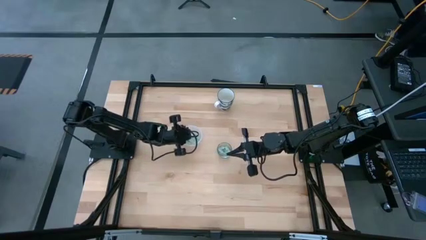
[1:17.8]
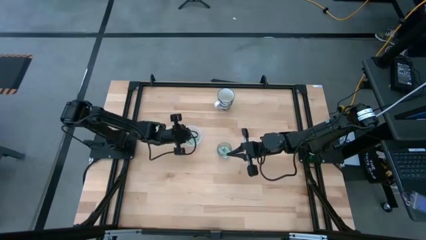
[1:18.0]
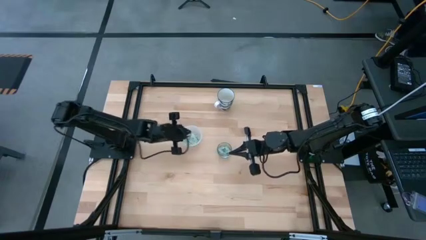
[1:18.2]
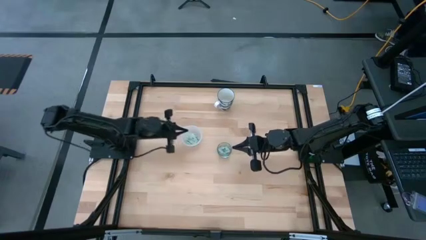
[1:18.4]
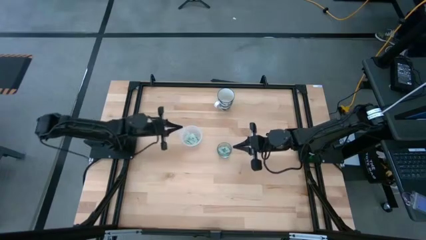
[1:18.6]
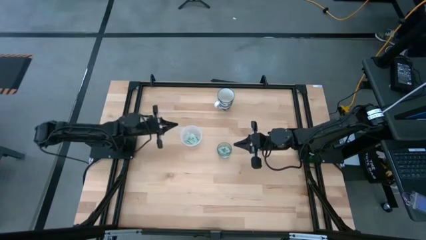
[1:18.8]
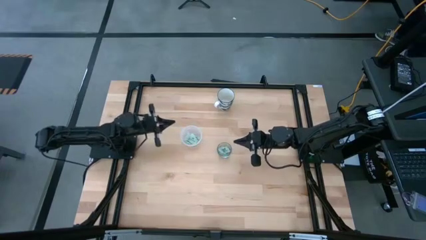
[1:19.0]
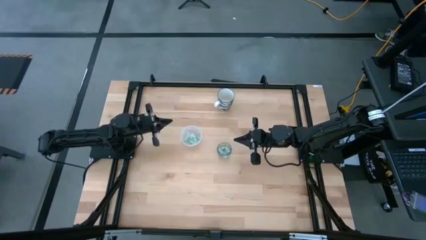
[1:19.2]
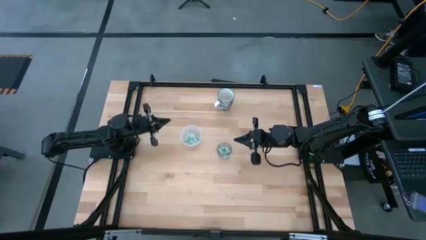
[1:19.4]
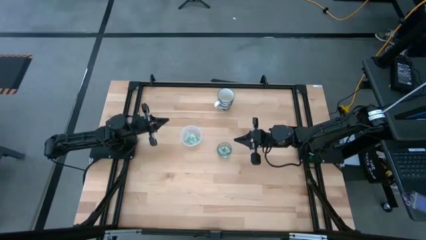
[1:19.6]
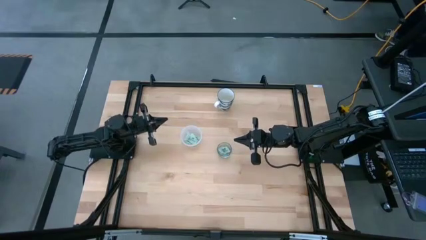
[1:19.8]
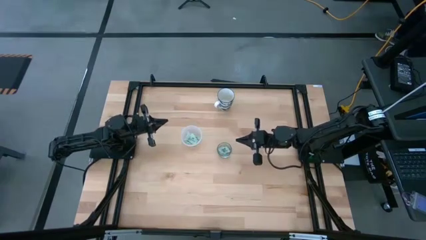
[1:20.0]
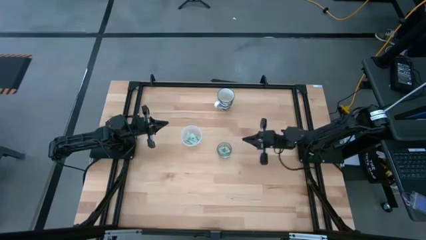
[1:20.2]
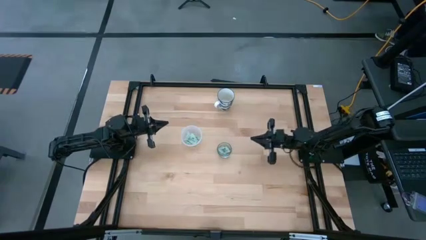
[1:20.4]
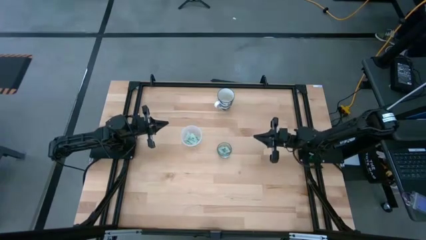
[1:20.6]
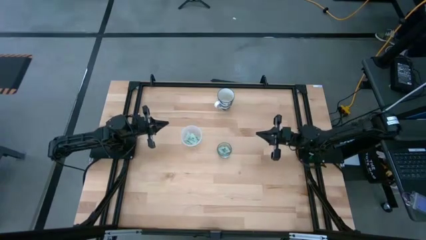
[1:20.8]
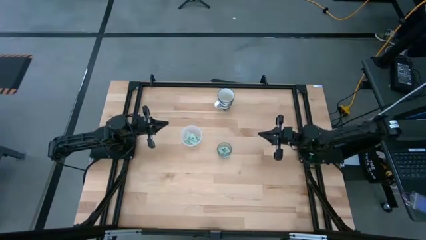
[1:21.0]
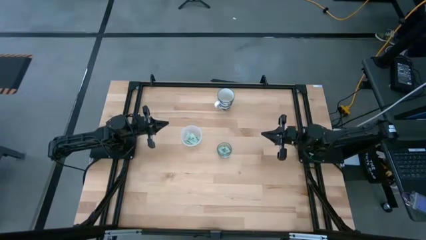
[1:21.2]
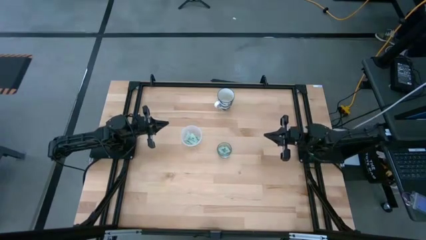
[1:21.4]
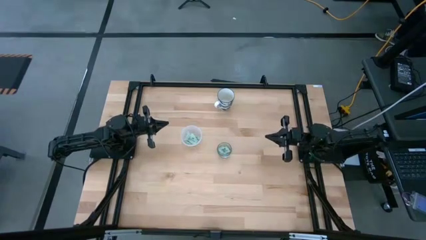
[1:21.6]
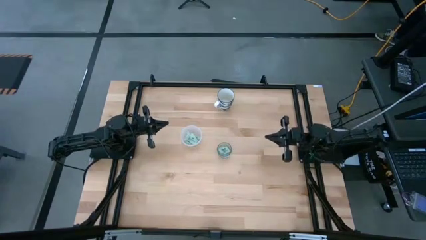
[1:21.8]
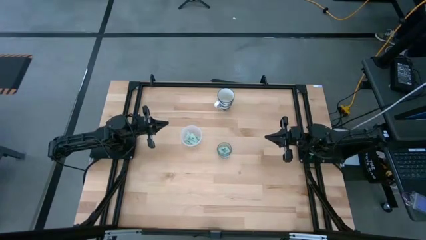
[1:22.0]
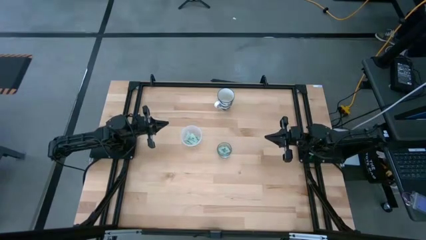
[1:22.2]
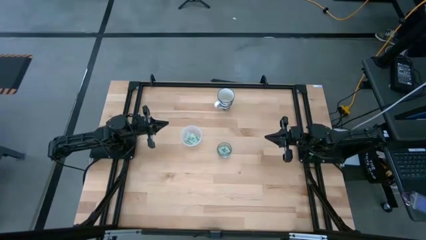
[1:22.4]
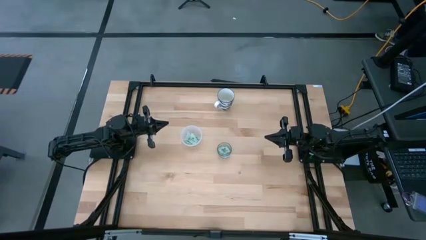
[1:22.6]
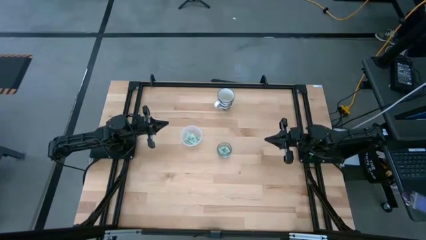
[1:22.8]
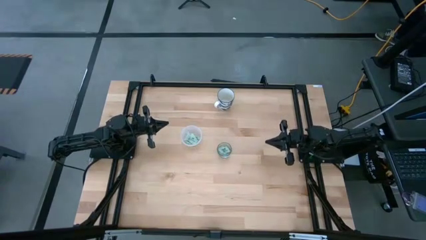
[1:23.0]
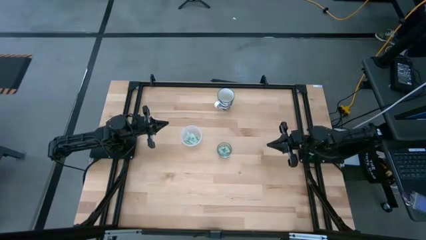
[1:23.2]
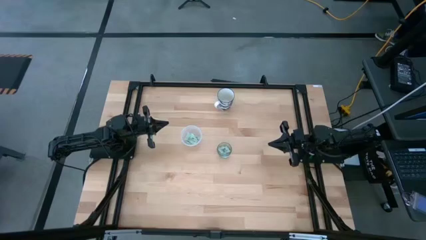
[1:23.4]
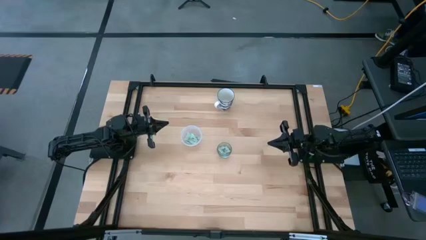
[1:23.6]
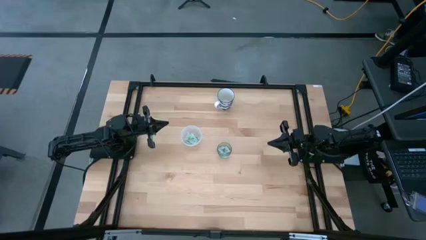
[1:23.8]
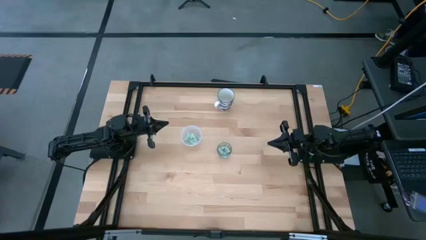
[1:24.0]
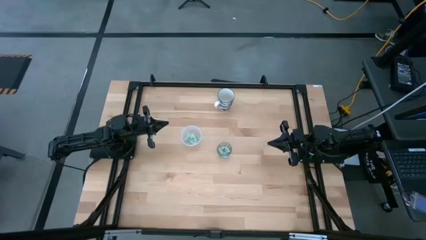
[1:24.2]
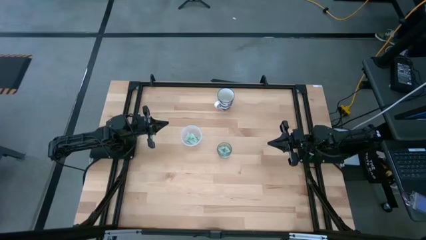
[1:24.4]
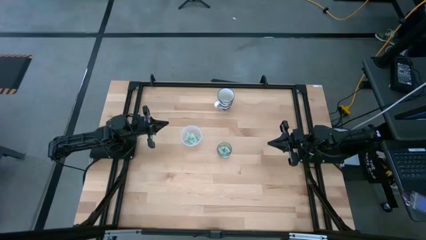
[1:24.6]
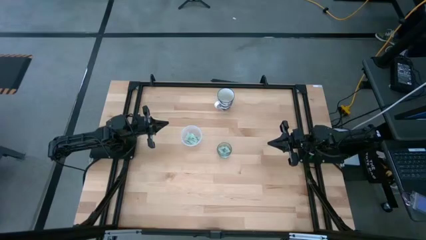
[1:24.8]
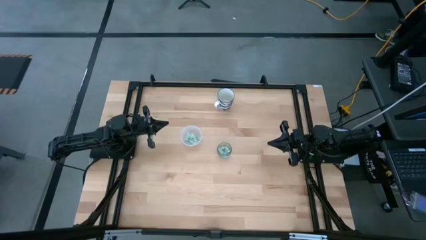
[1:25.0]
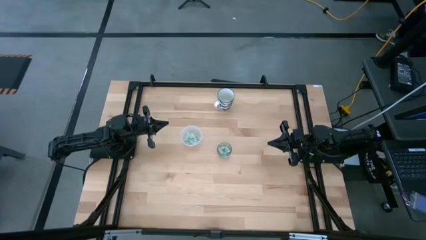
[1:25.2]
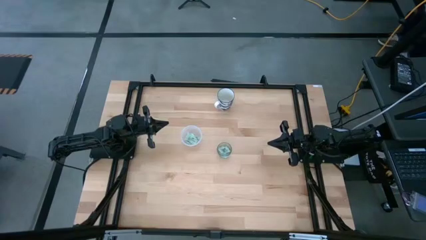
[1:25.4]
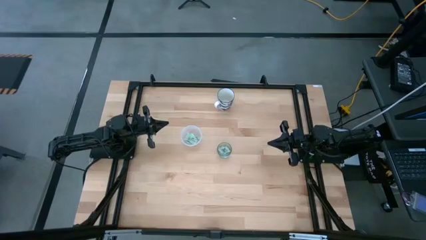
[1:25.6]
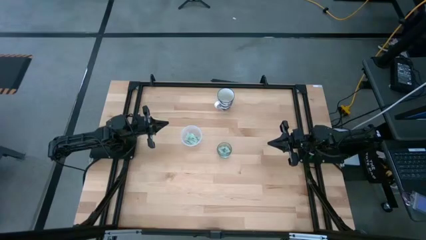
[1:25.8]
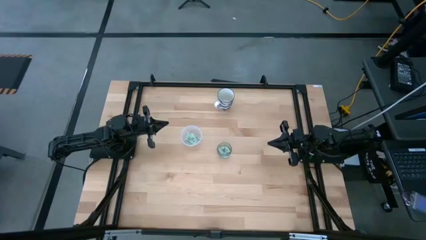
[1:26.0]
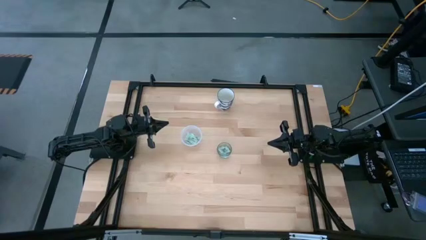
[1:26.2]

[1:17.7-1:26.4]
Task: Pick and place Stevia / Truvia into bins
Return to Home Position

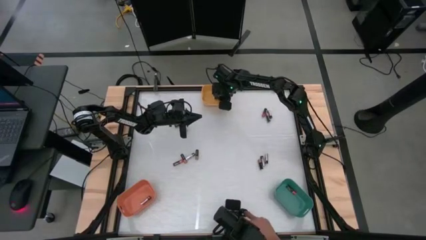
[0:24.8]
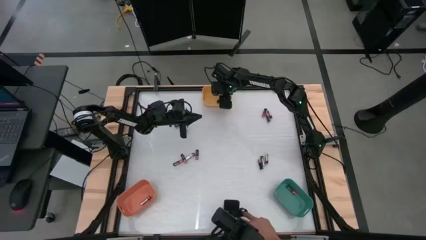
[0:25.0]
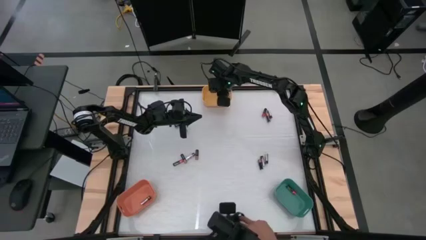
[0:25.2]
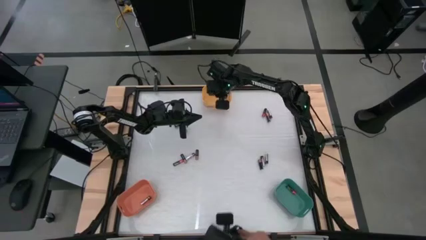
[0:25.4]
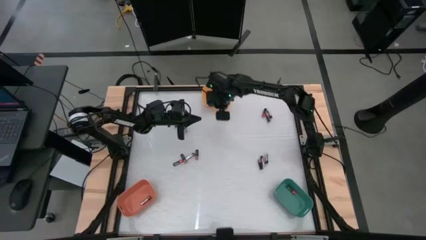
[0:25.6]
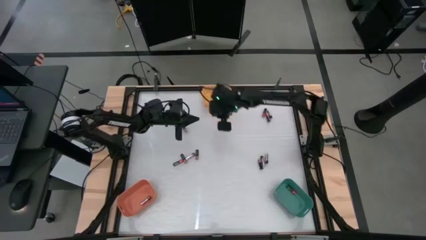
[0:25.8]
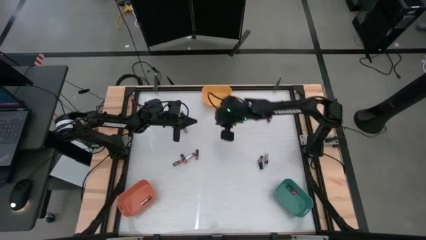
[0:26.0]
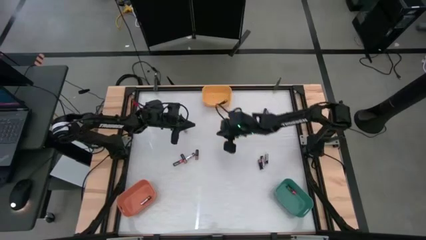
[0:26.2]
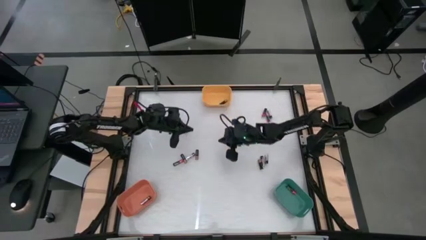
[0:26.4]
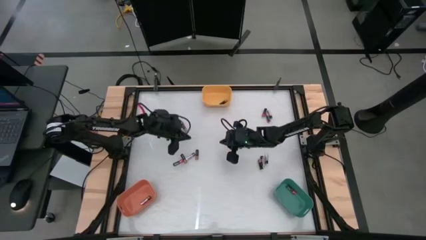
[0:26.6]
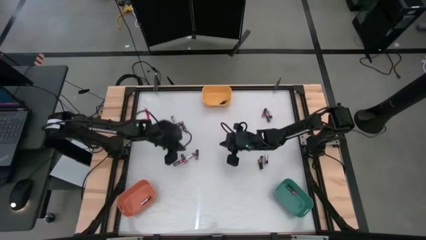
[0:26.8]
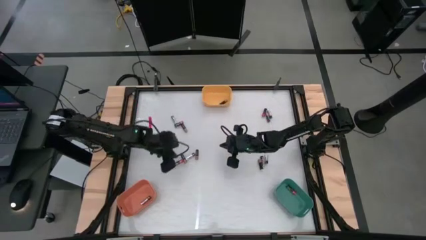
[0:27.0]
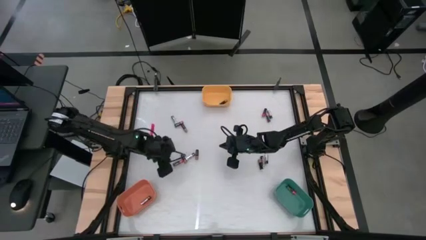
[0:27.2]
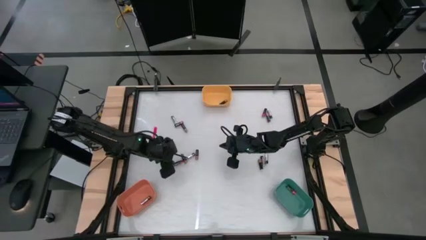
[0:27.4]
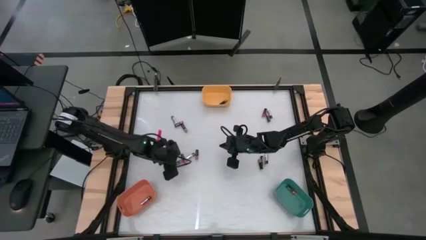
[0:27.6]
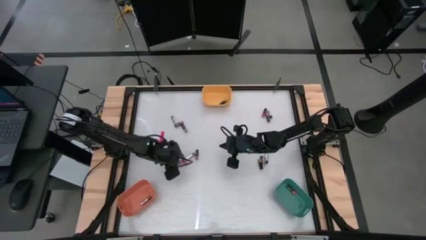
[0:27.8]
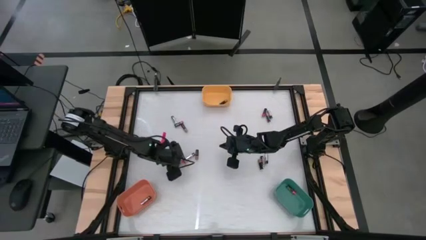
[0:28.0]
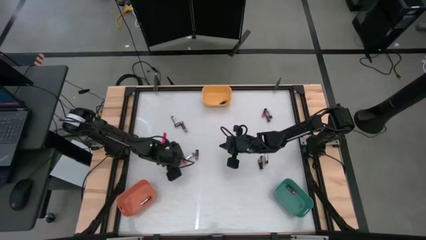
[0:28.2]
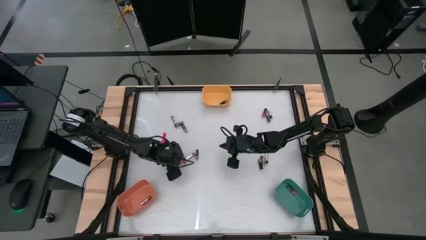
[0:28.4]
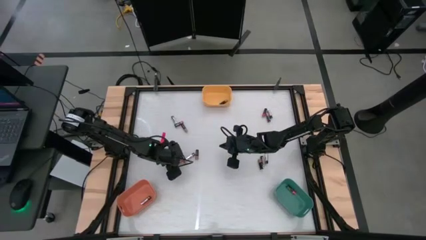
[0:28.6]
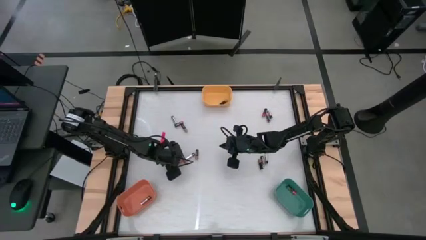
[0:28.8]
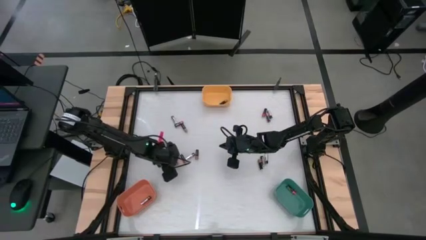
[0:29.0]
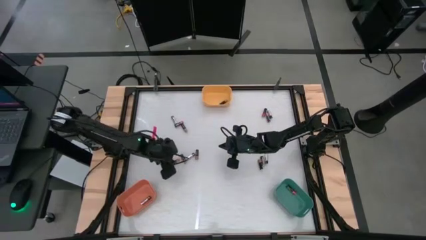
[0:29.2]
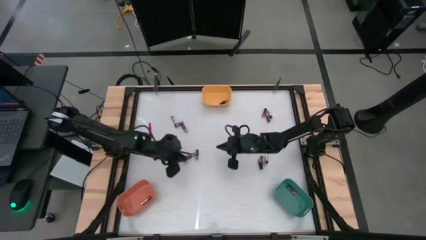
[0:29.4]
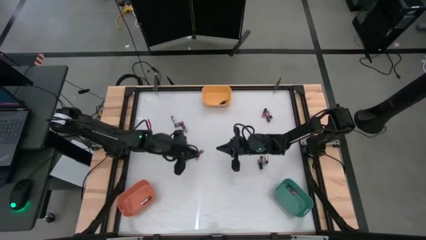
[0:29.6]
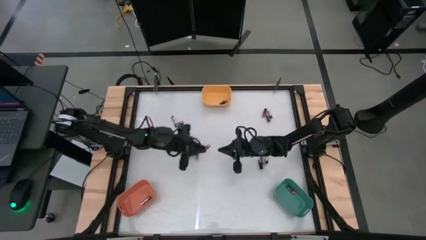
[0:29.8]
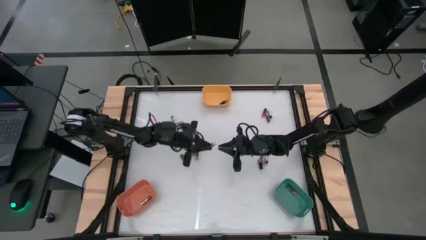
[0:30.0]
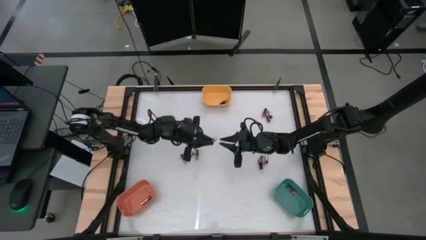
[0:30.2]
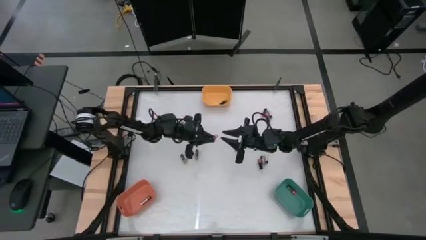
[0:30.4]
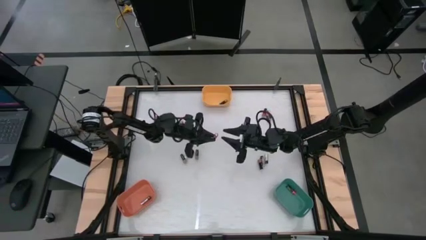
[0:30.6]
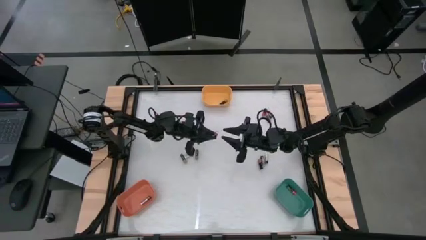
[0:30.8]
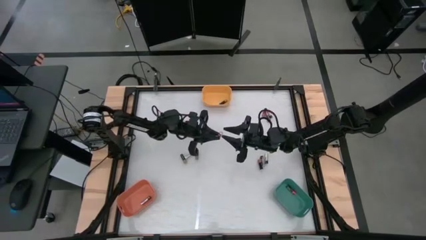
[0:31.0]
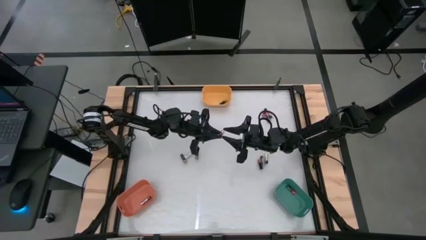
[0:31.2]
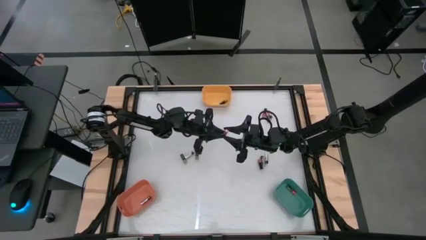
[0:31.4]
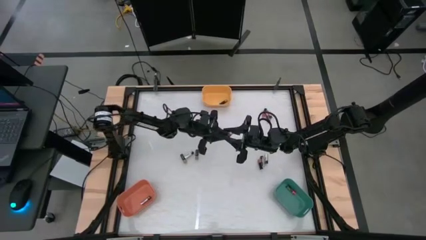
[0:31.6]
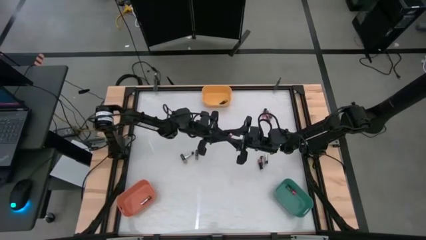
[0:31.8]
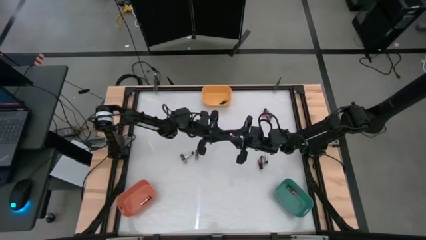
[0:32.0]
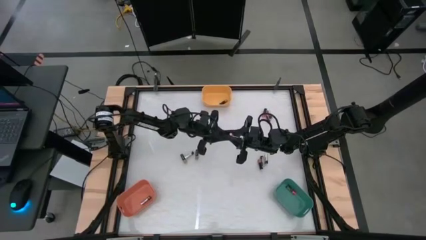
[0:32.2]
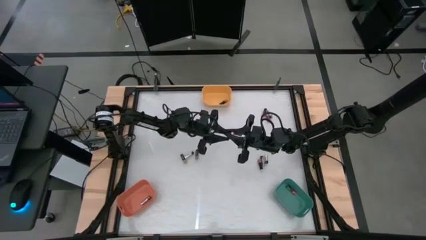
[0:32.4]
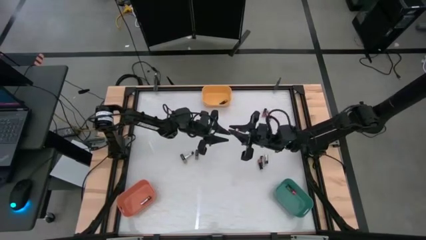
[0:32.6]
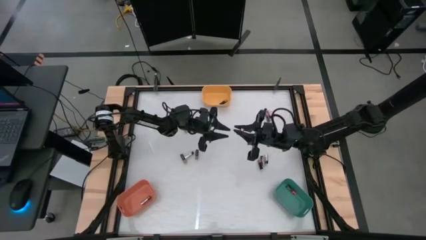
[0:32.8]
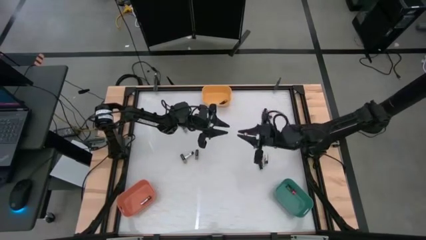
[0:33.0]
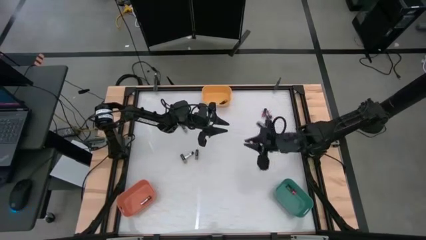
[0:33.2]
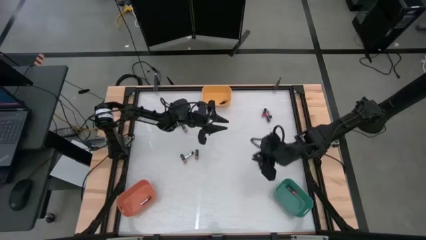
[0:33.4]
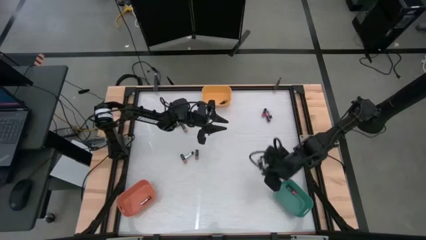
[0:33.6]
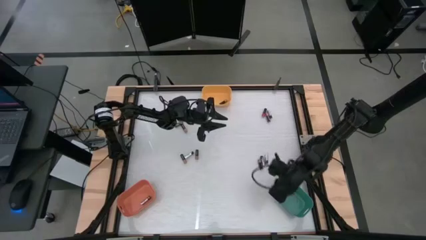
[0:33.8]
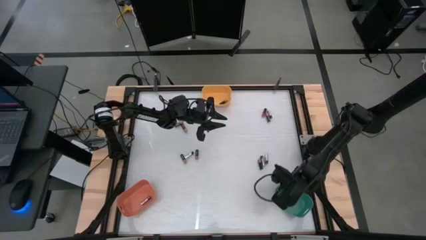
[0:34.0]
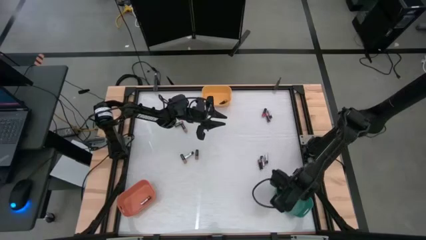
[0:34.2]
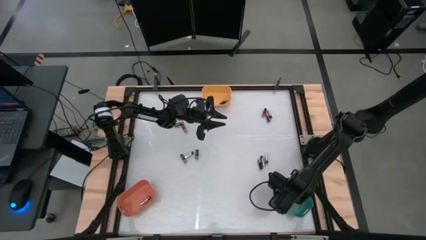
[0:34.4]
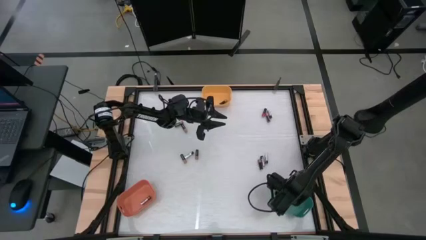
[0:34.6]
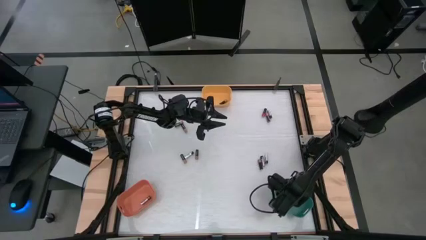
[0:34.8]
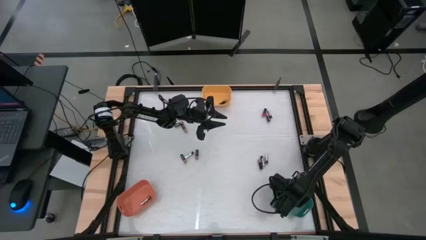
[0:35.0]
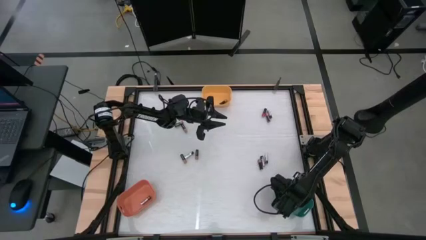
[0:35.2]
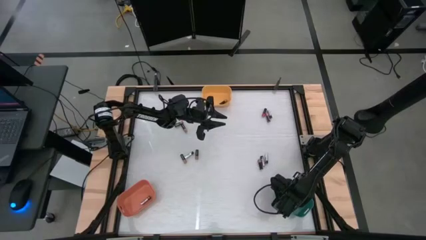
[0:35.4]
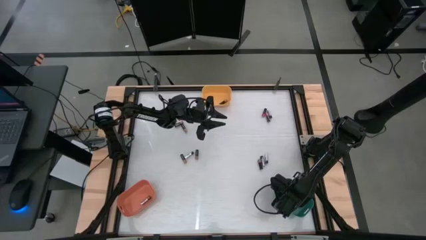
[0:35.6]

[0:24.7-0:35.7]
Task: Sort batteries
Put the black-red battery into the green bin
